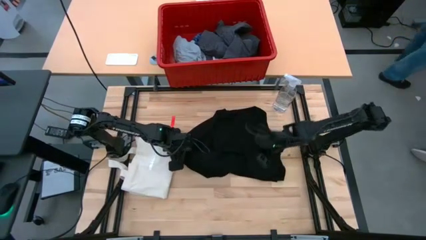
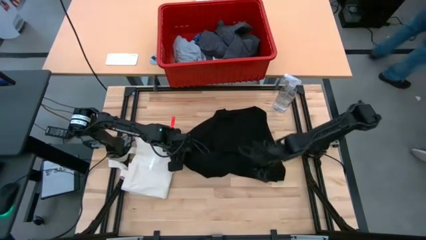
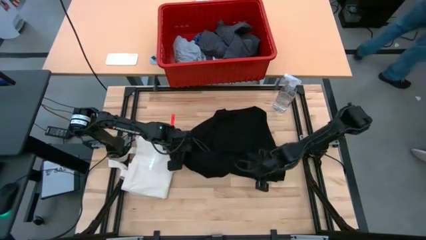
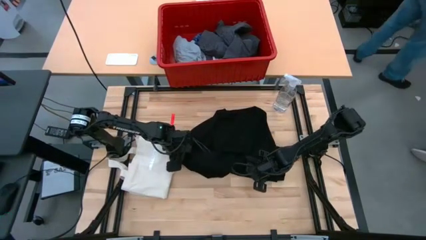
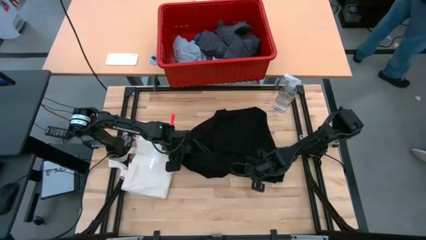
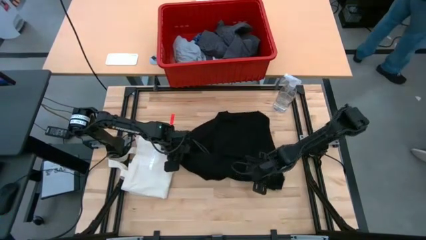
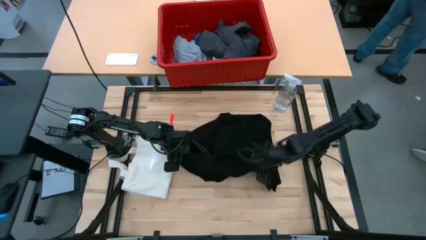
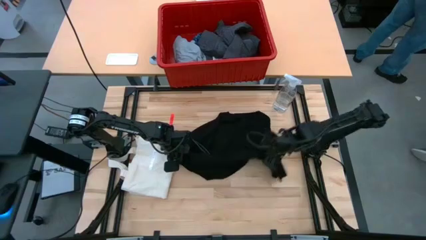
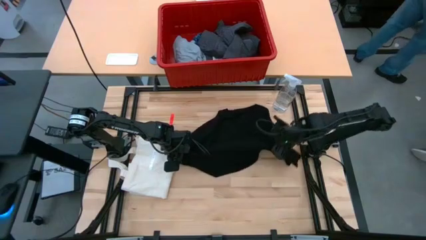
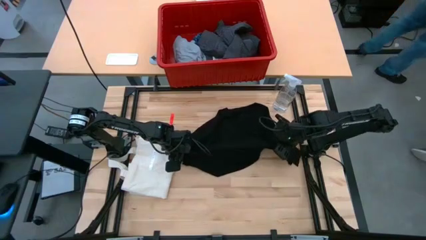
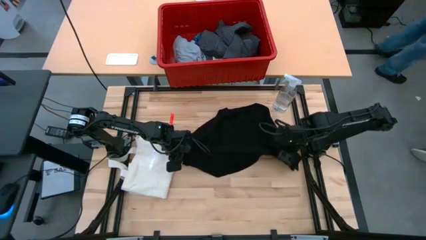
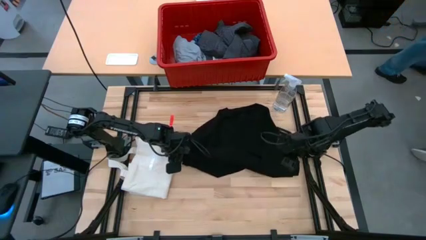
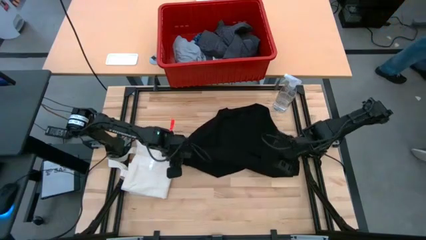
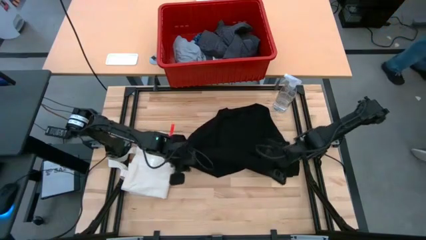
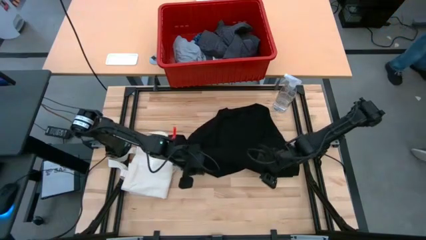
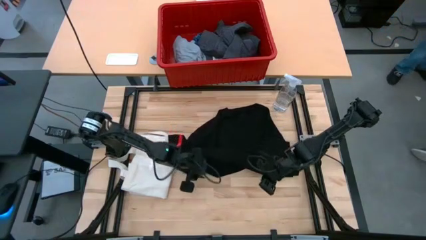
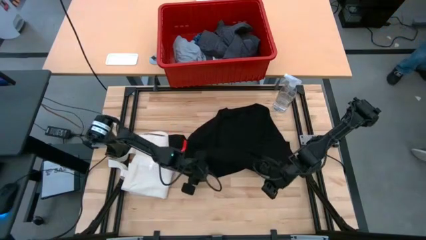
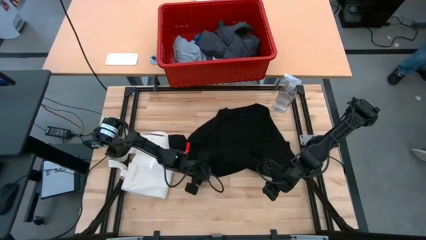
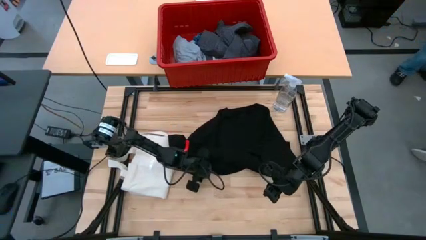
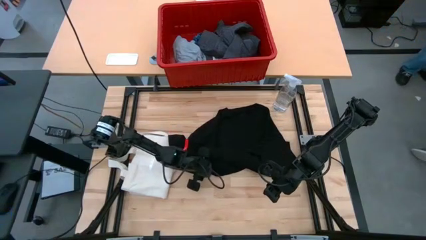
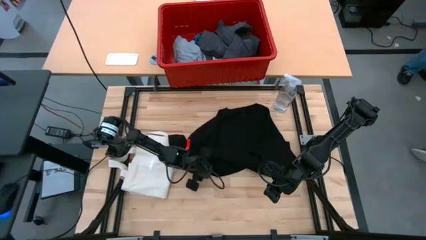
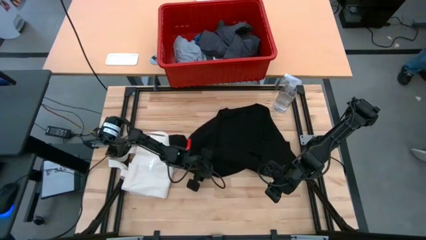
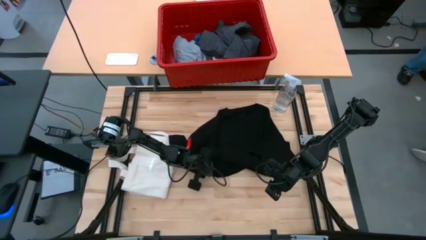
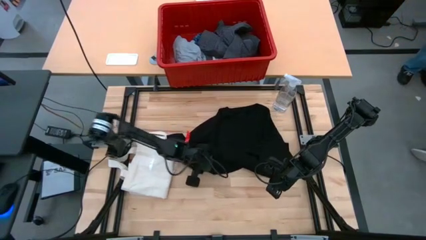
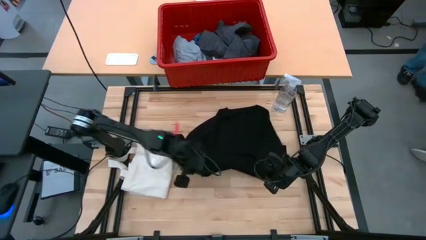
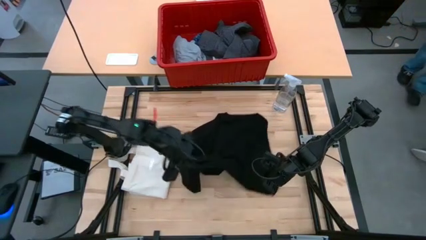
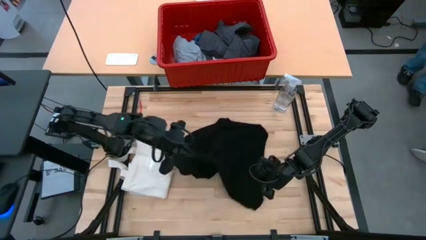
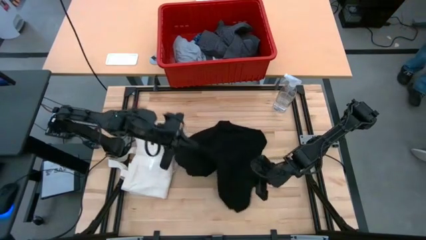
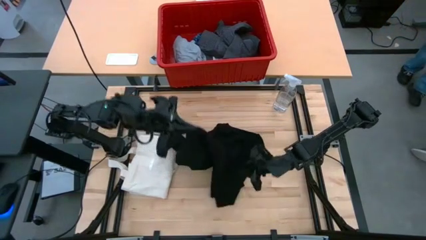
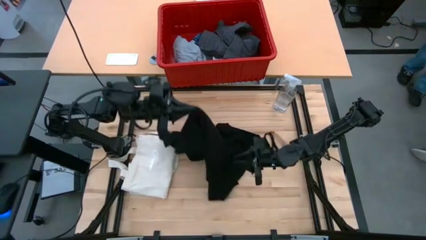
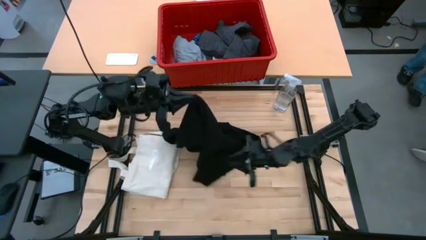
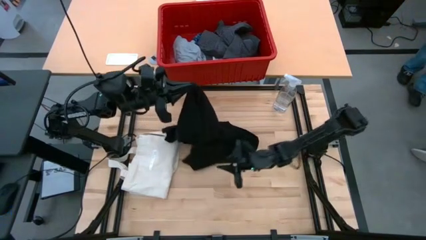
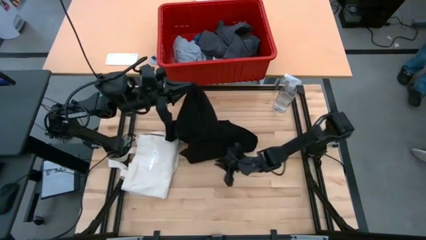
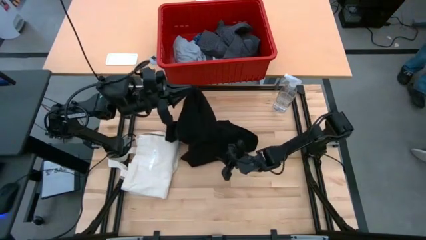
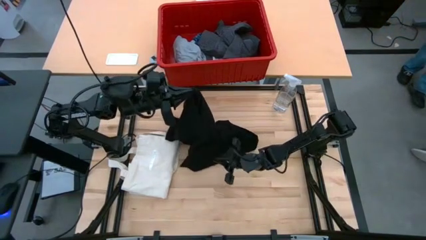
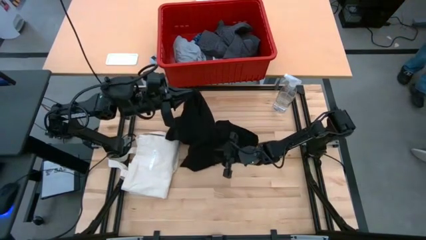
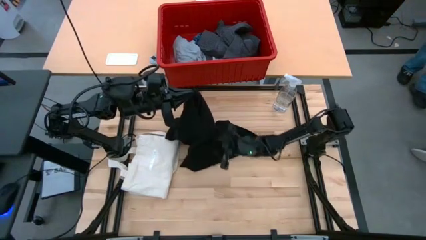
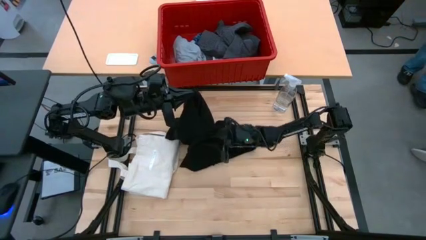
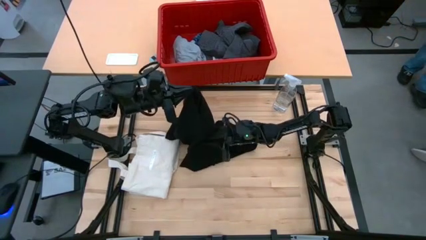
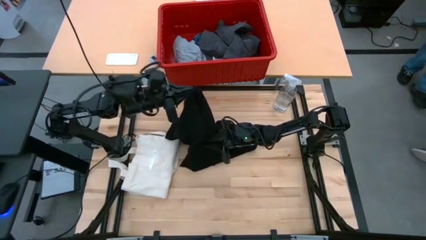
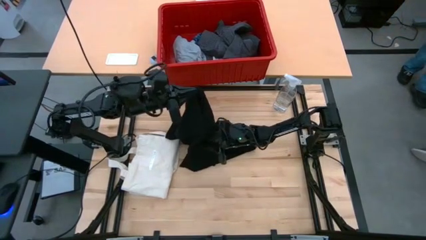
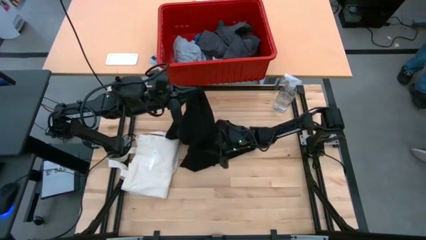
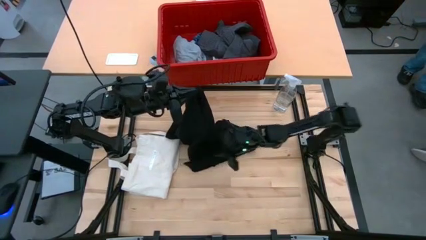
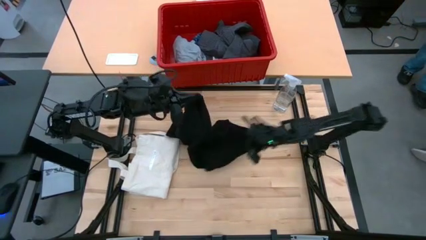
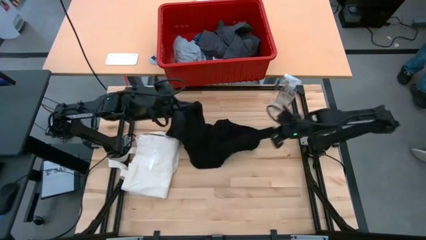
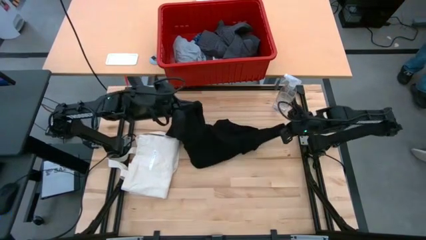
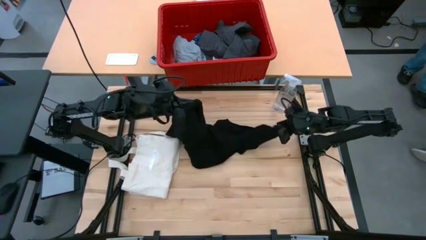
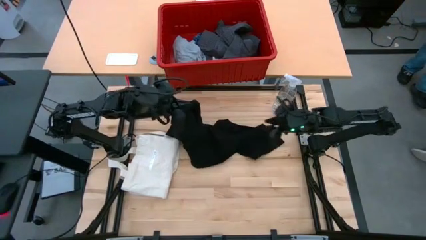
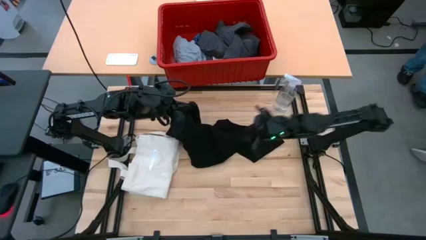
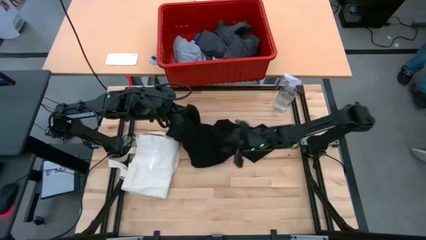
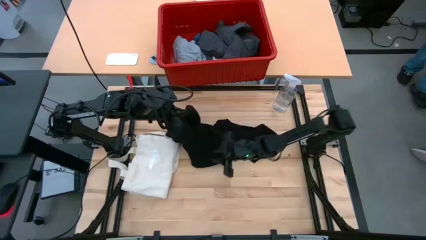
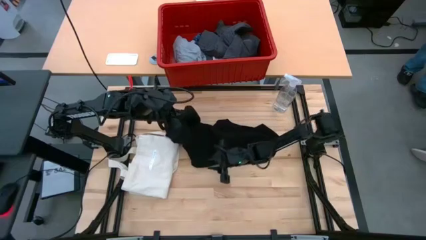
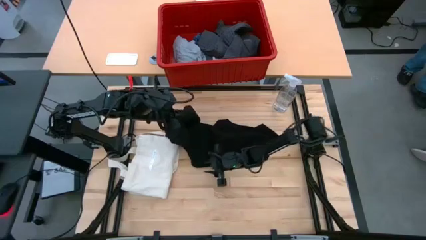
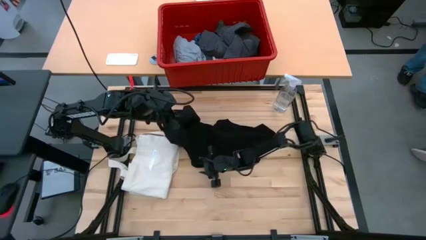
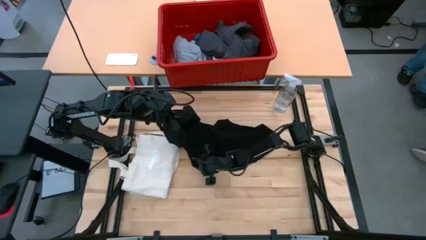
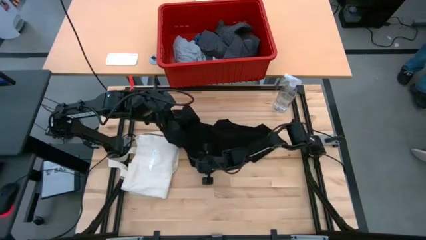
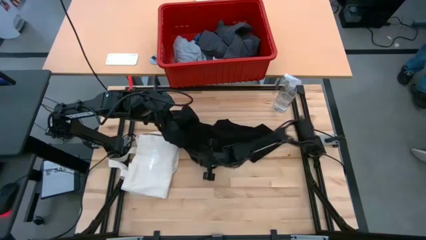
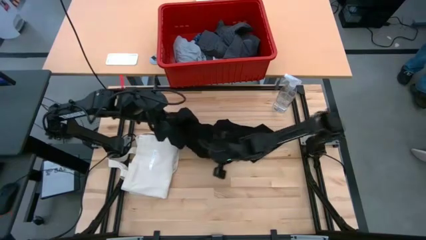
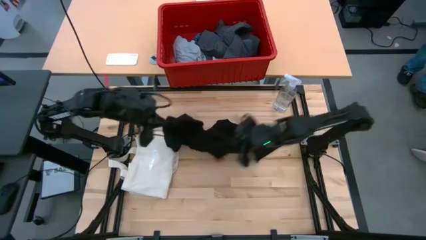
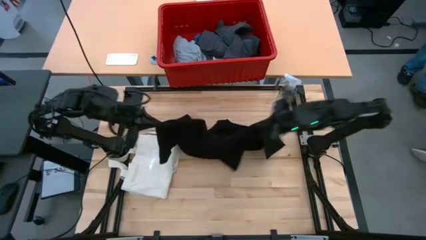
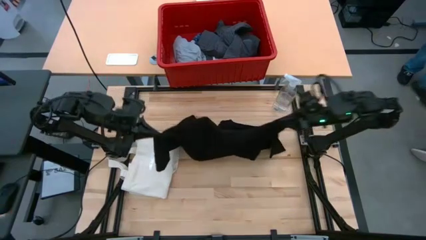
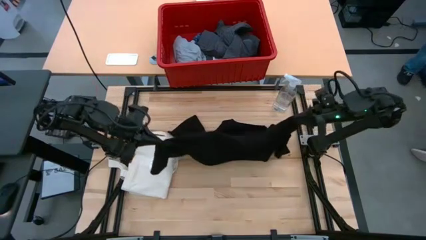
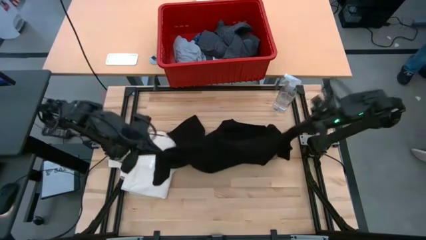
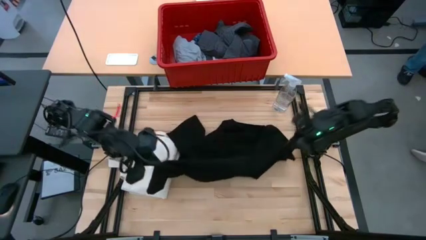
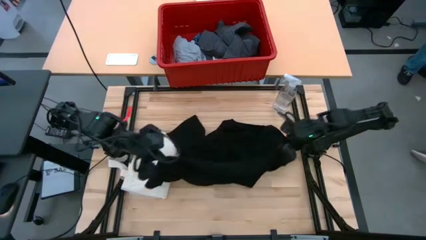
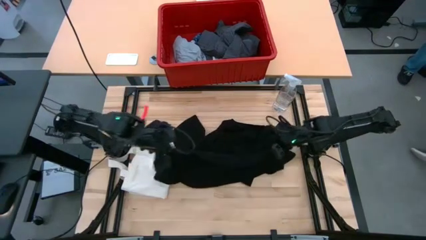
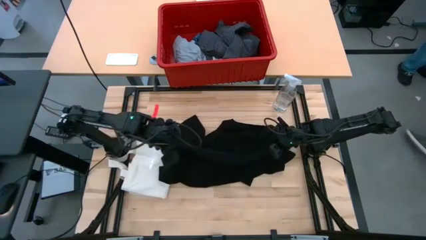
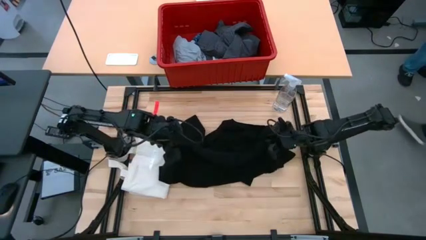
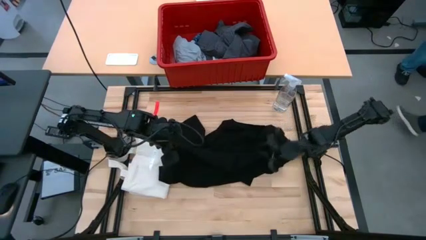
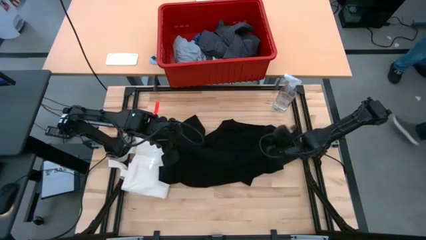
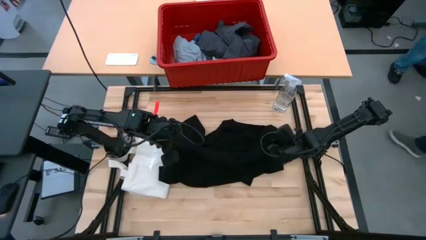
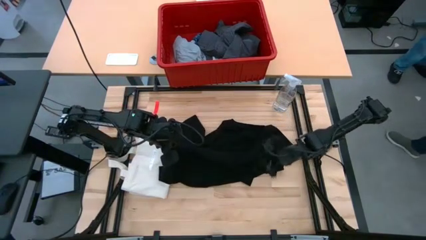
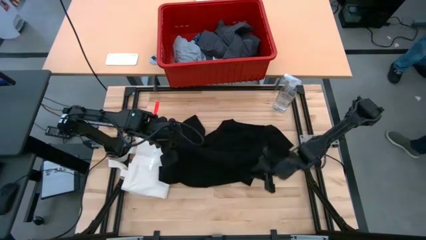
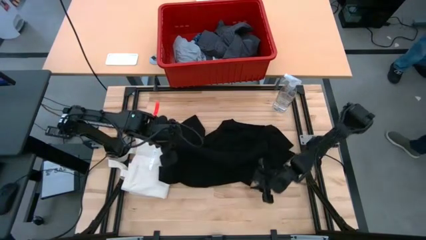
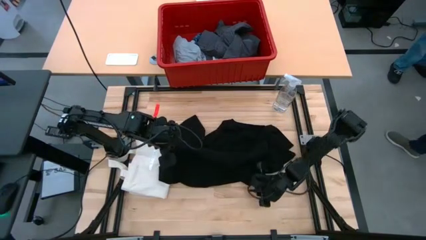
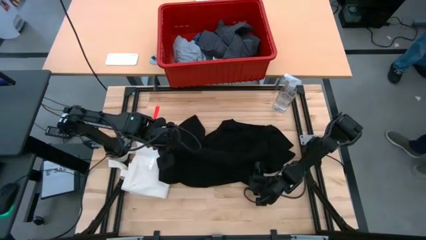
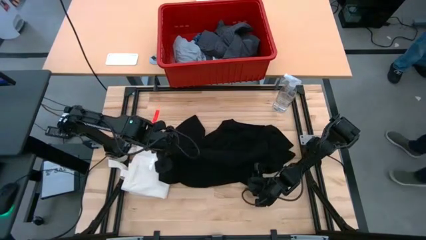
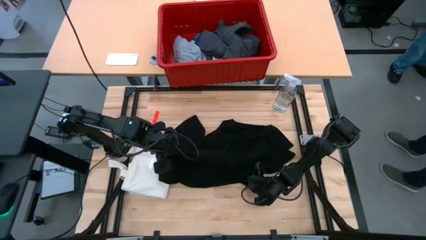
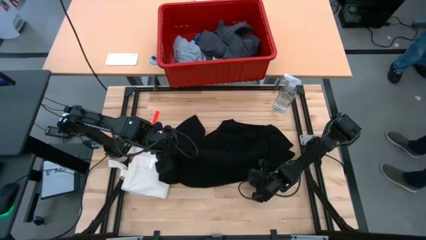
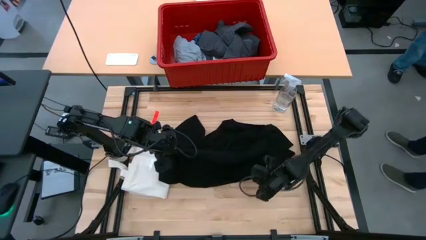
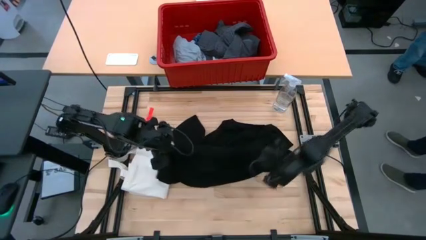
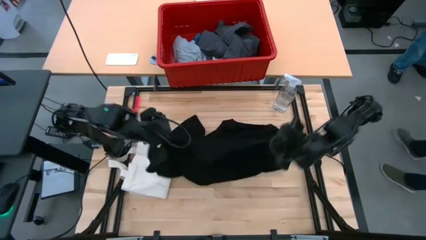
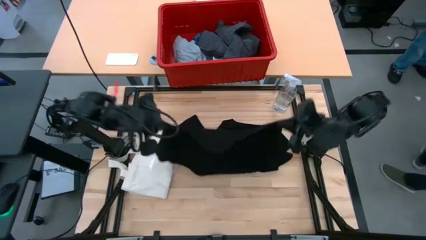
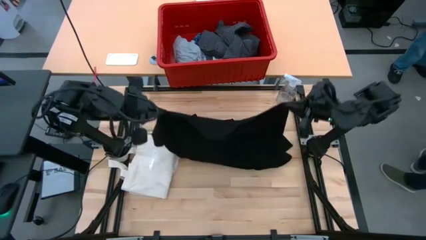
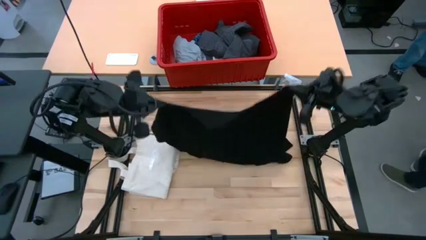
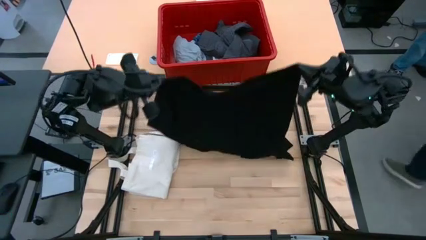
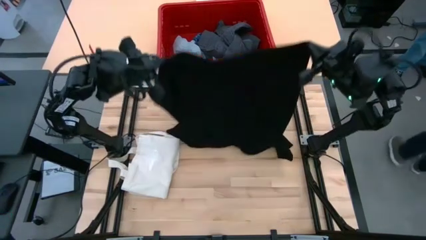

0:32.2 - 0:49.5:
Task: Fold Laundry from Bin
Fold the black shirt
